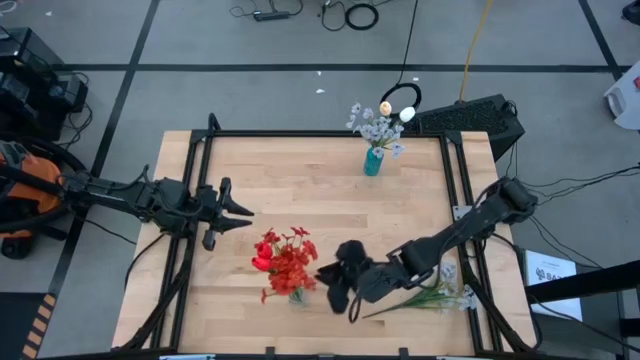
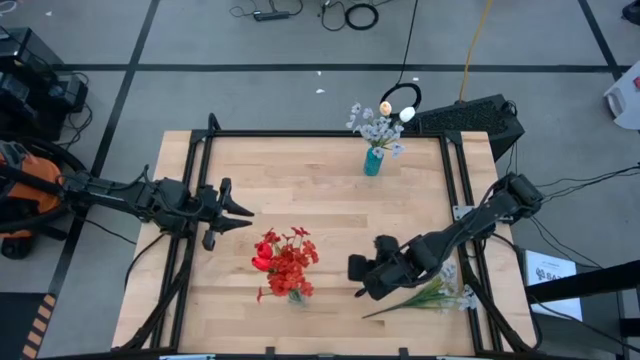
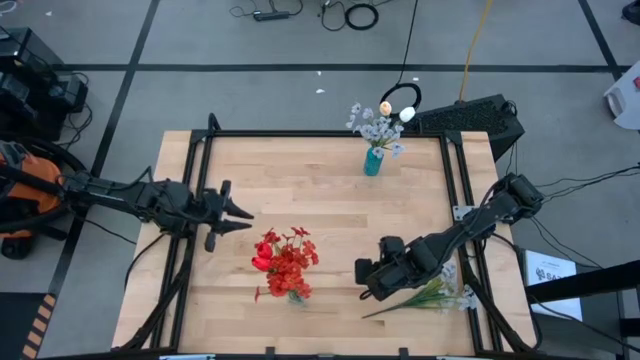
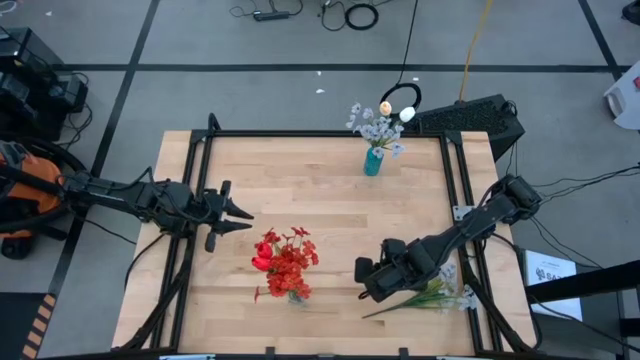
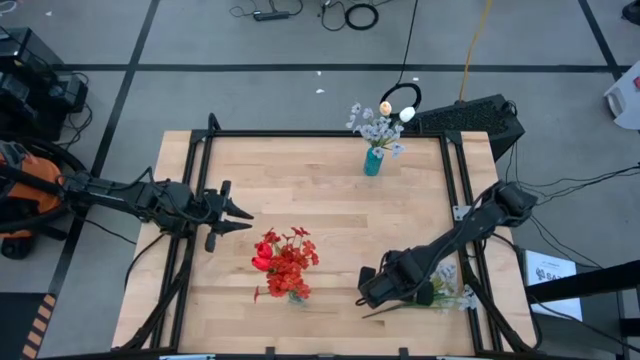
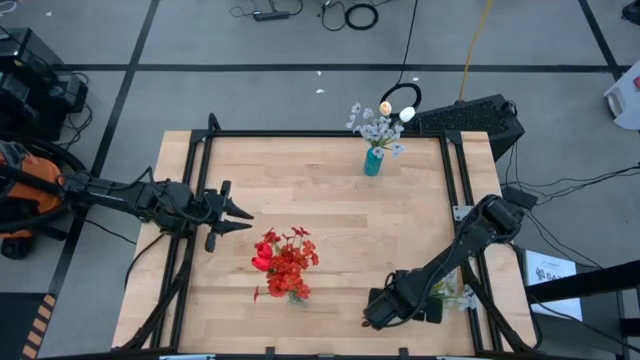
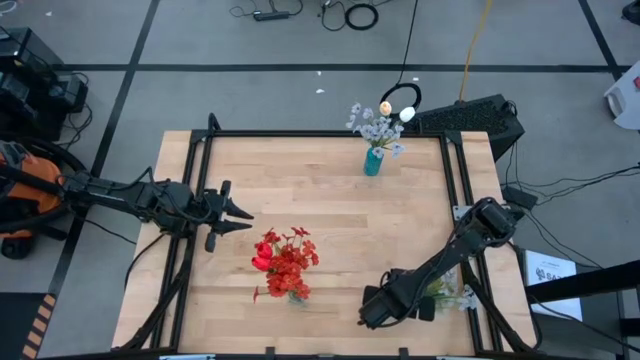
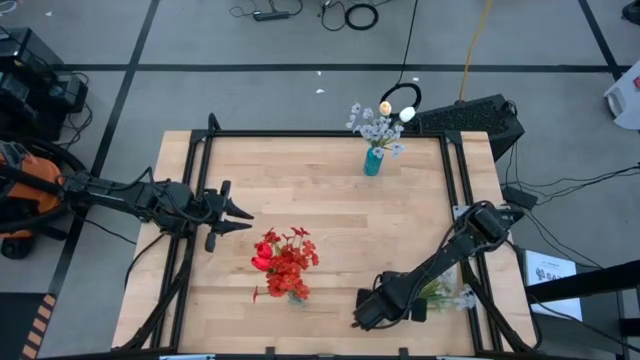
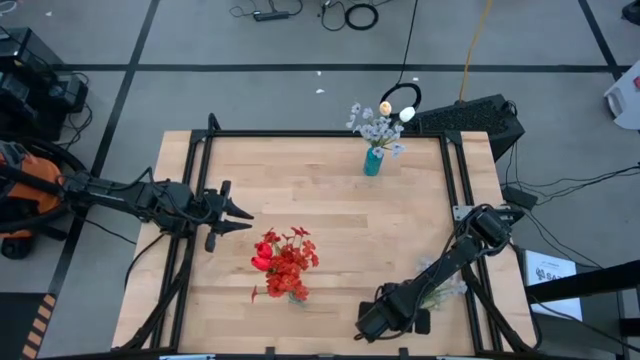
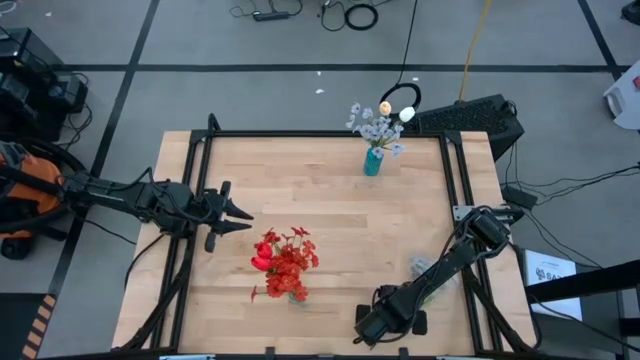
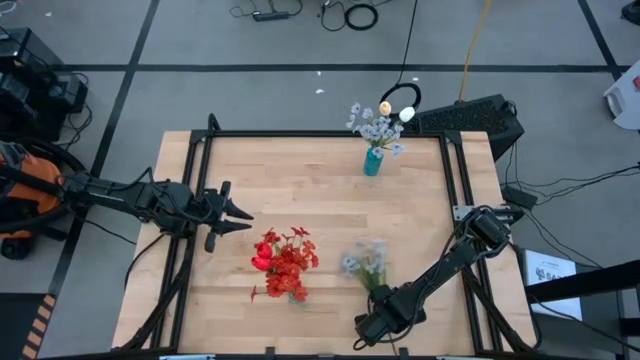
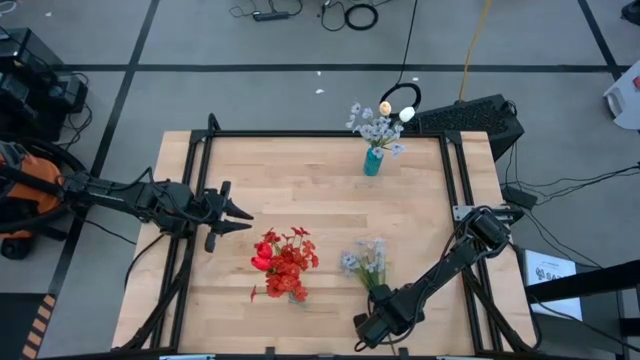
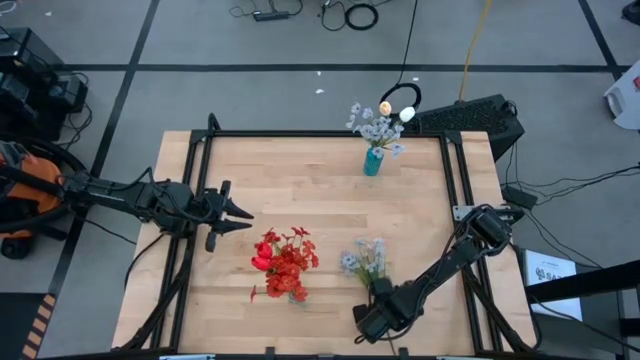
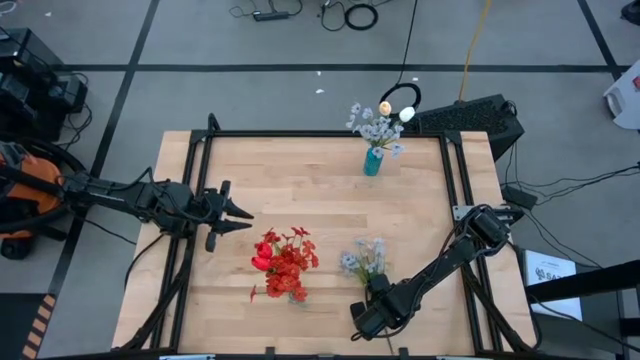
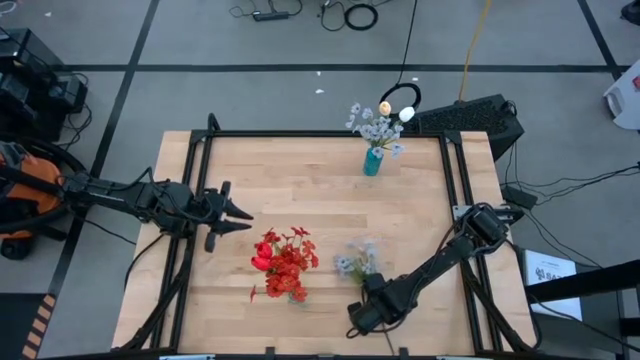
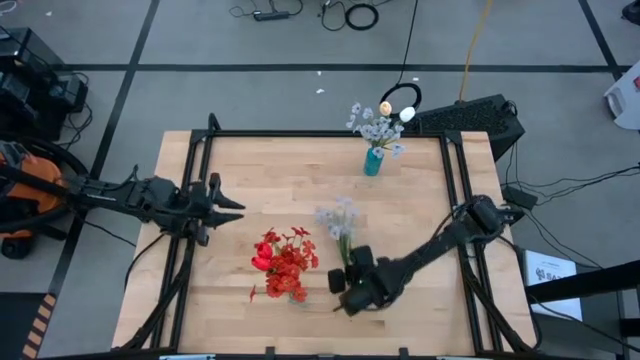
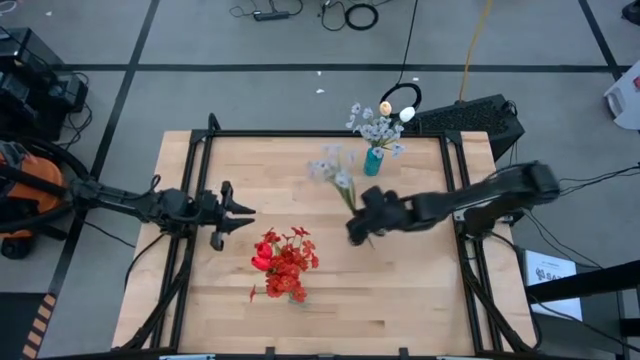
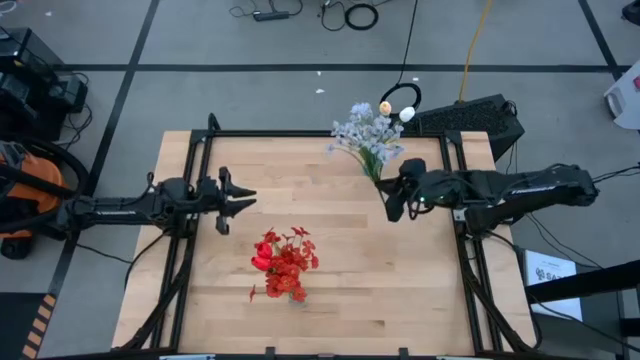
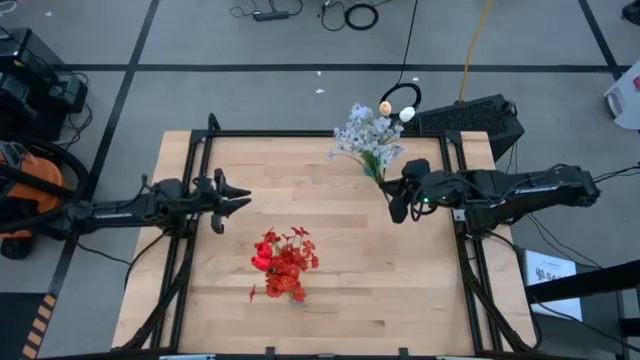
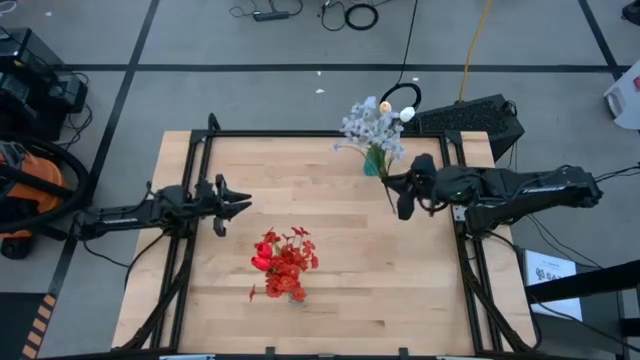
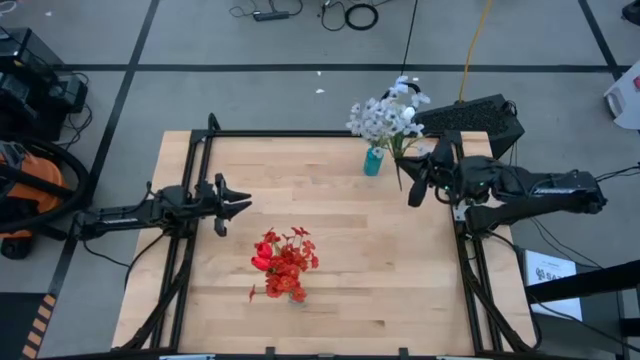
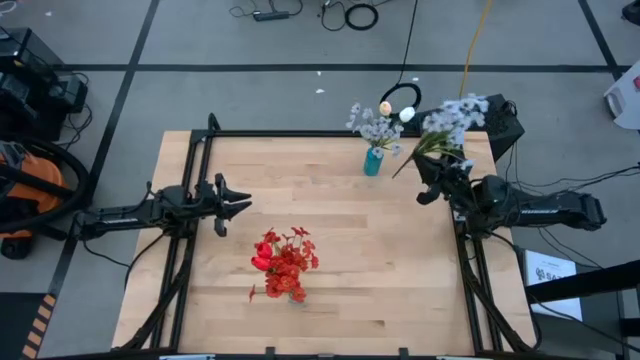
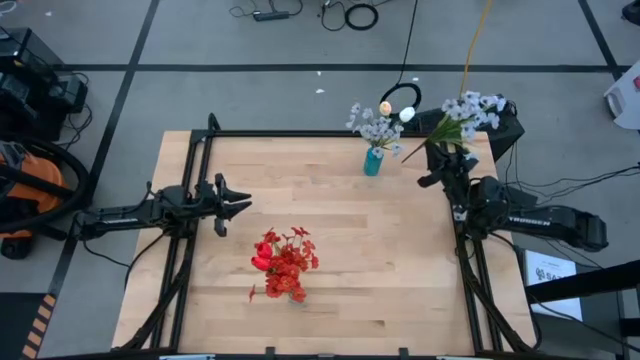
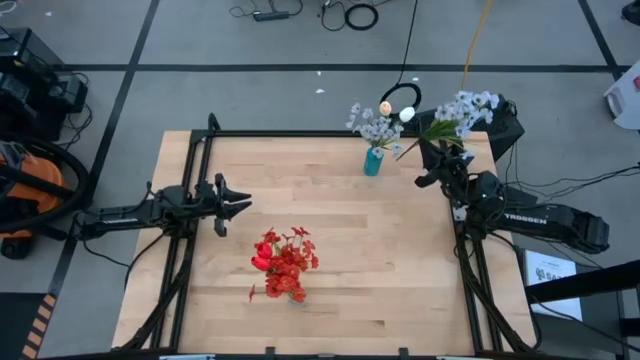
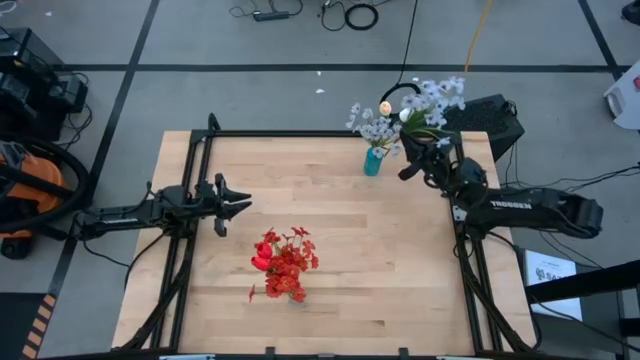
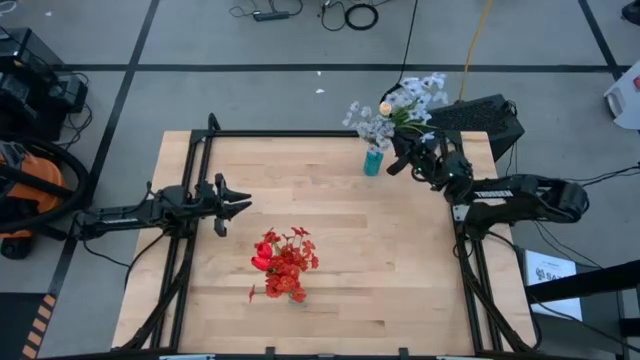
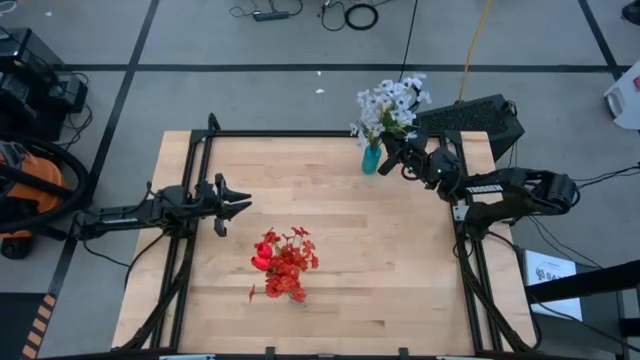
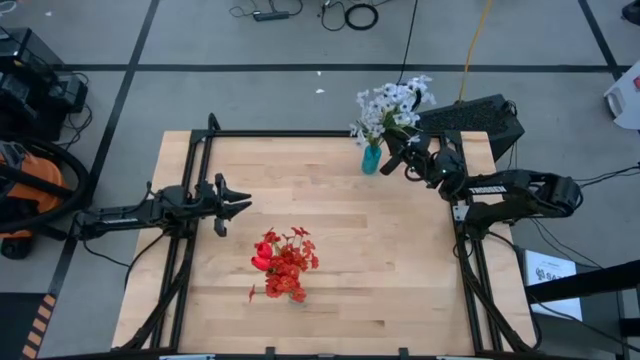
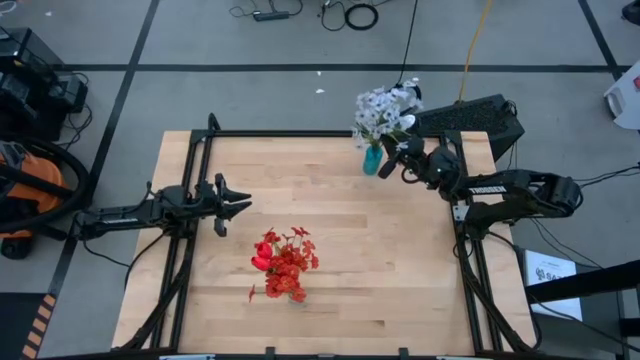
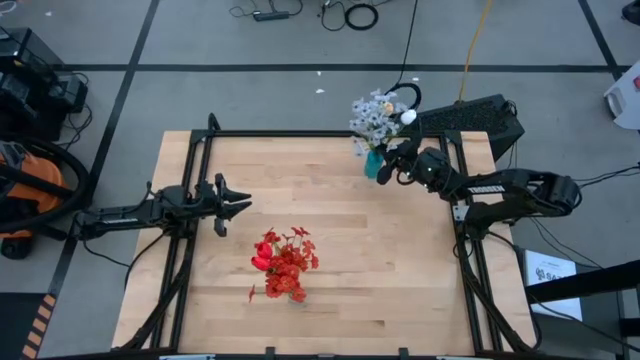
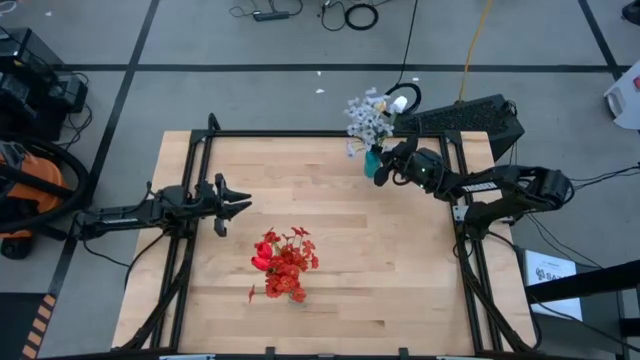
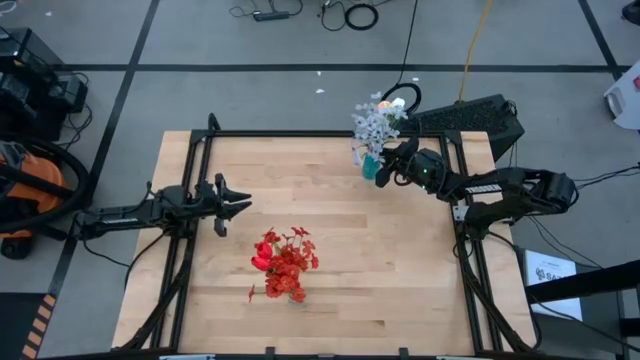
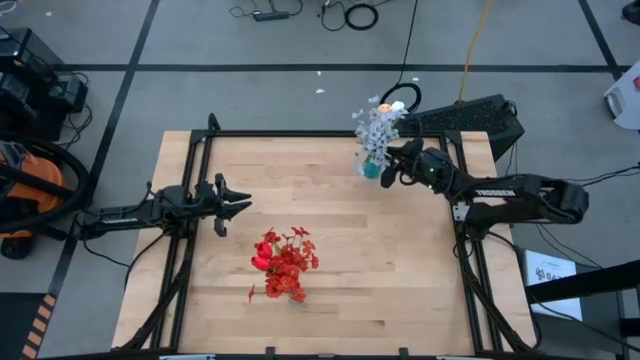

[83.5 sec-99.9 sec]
Task: Sort flowers into vase by color
Put the white flowers into the blue vase

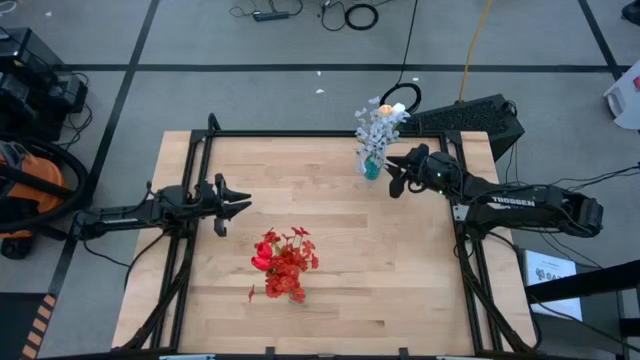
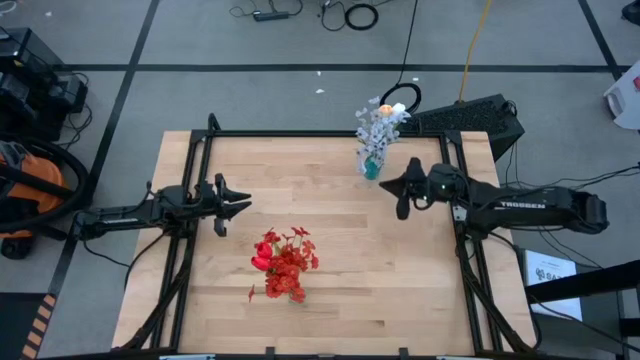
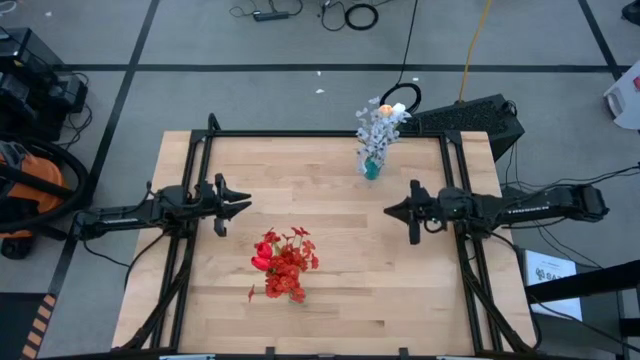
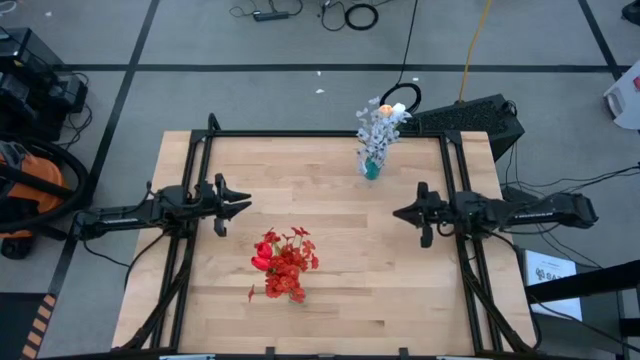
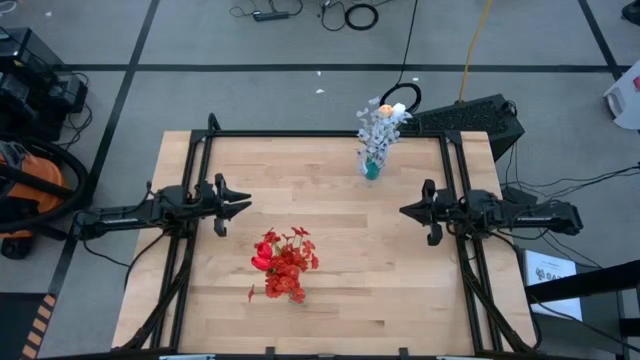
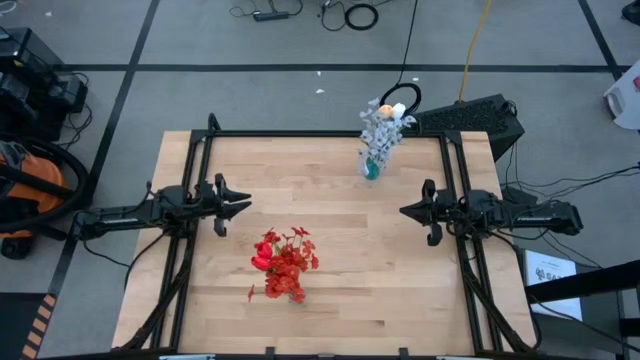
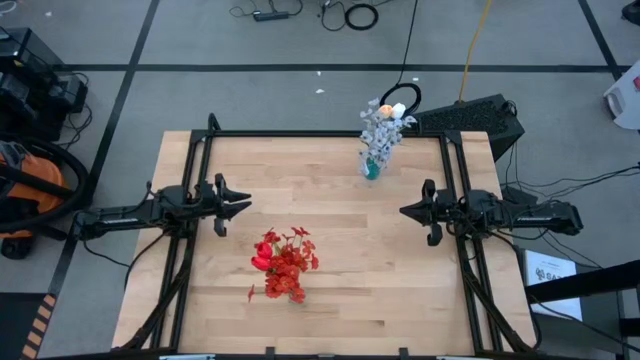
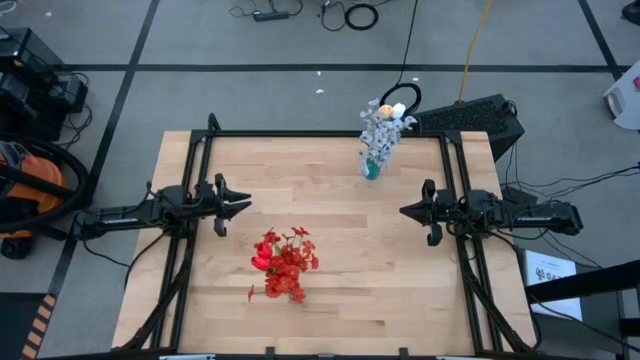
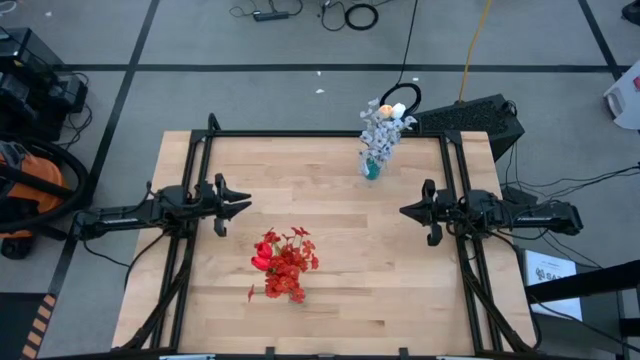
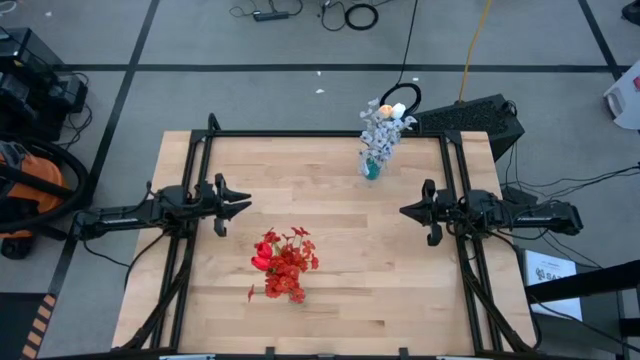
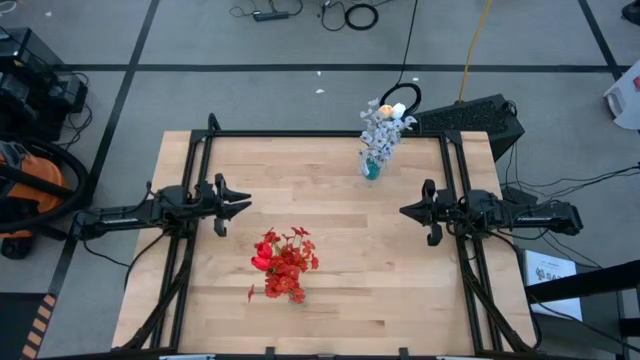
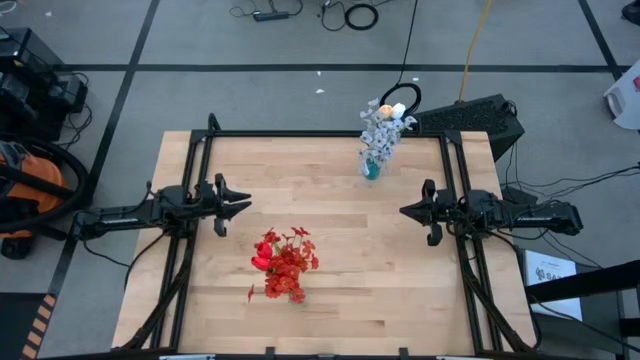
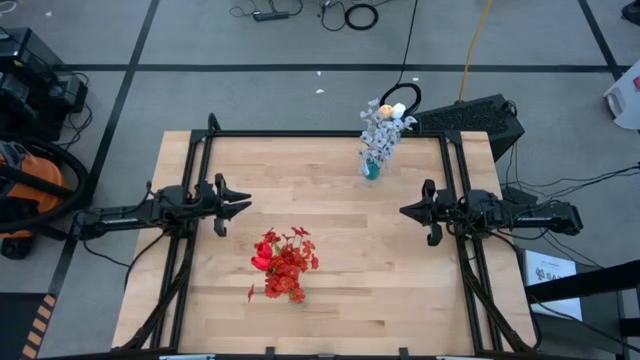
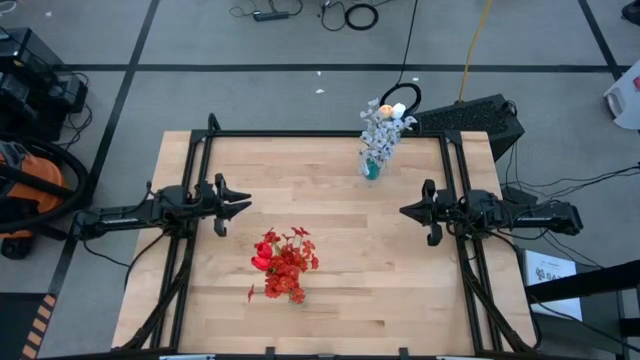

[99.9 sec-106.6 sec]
Return to Home Position
